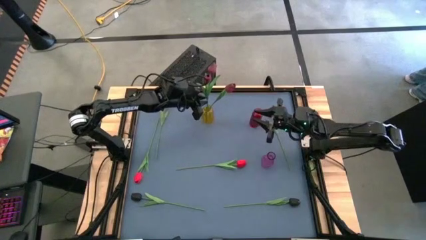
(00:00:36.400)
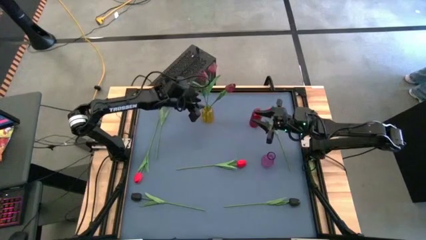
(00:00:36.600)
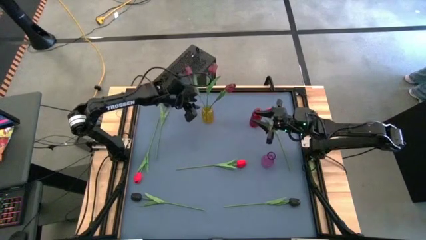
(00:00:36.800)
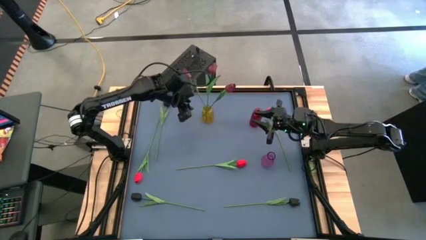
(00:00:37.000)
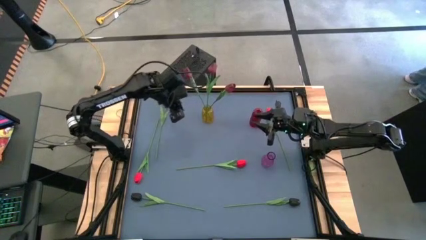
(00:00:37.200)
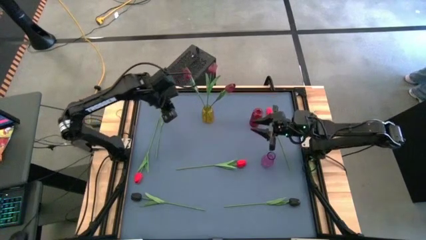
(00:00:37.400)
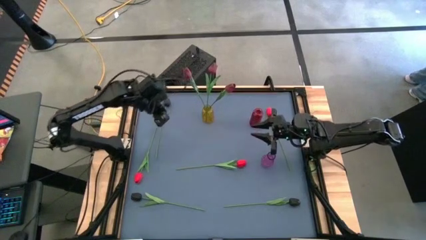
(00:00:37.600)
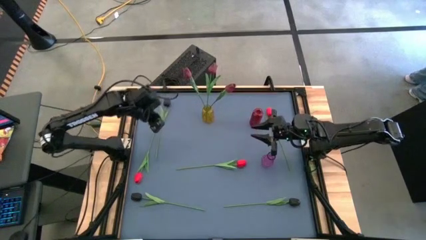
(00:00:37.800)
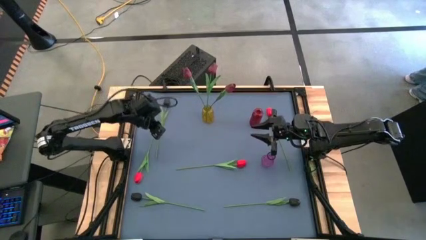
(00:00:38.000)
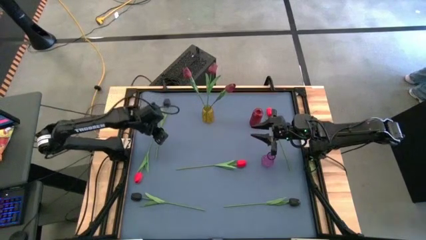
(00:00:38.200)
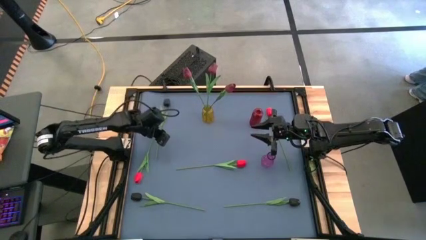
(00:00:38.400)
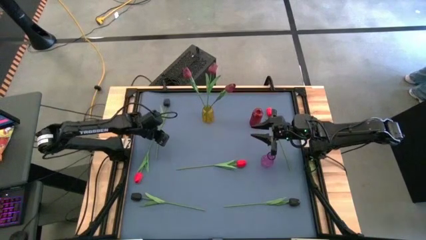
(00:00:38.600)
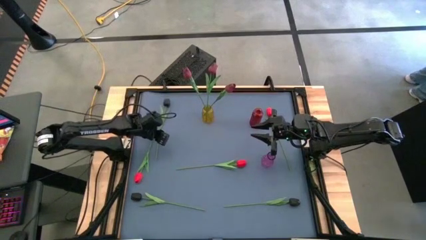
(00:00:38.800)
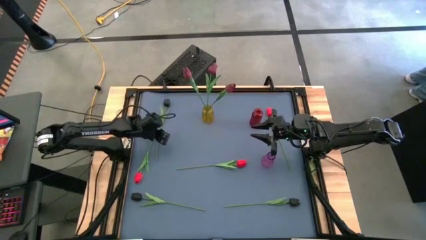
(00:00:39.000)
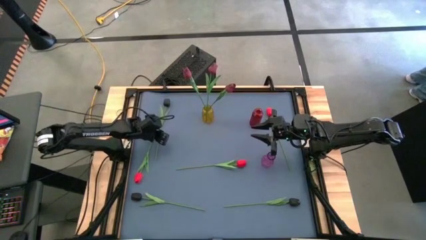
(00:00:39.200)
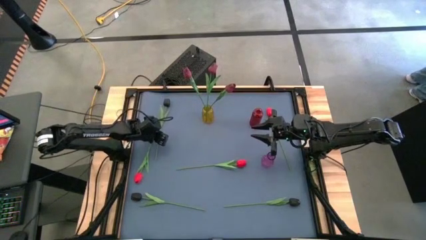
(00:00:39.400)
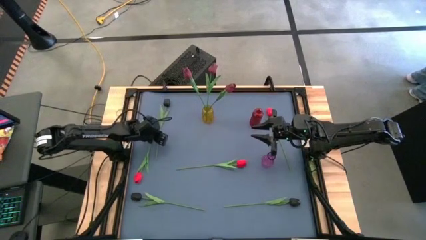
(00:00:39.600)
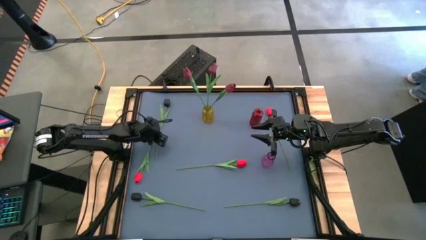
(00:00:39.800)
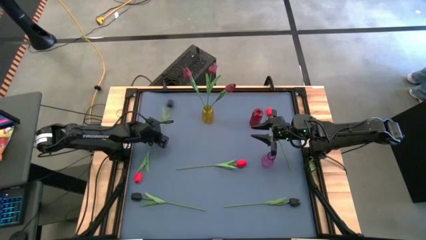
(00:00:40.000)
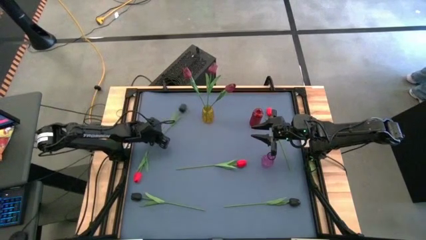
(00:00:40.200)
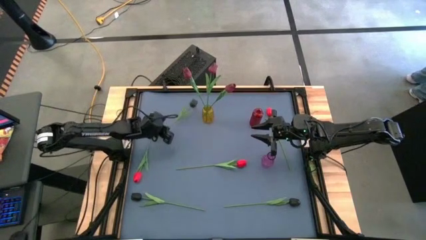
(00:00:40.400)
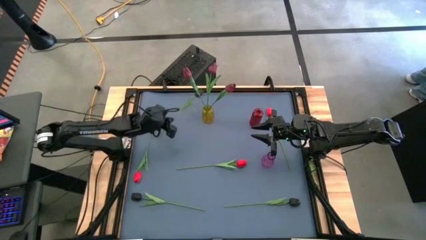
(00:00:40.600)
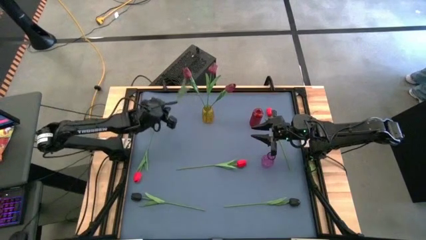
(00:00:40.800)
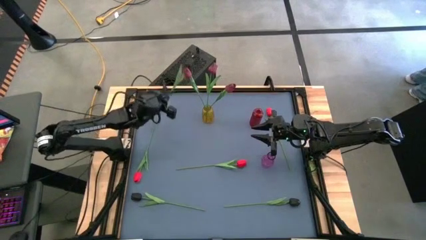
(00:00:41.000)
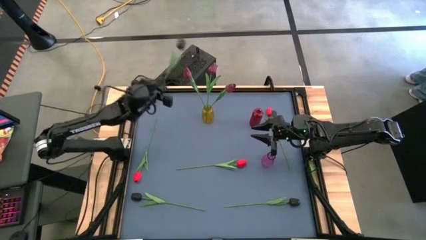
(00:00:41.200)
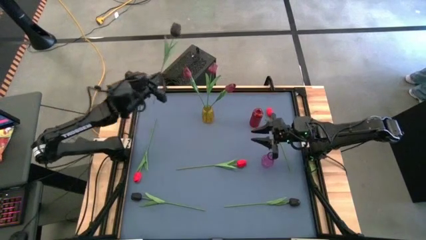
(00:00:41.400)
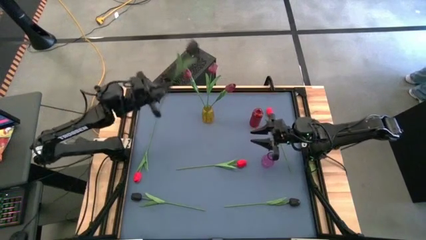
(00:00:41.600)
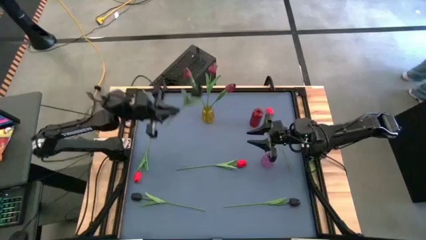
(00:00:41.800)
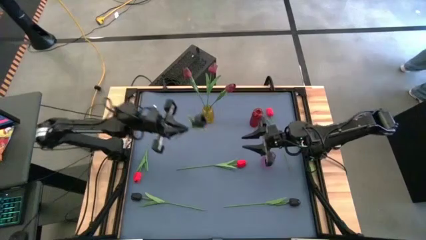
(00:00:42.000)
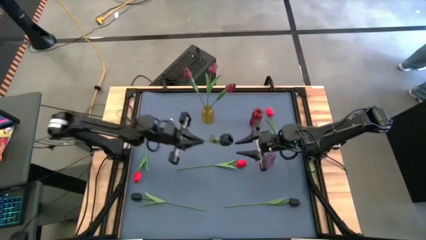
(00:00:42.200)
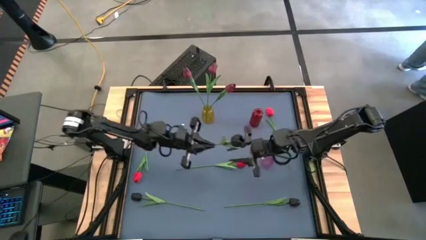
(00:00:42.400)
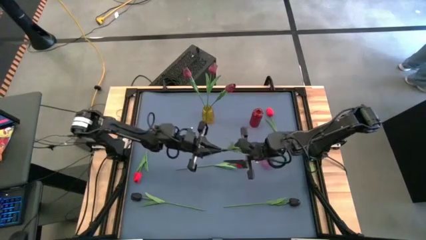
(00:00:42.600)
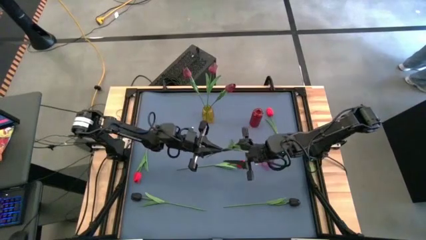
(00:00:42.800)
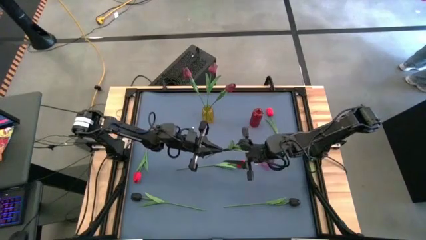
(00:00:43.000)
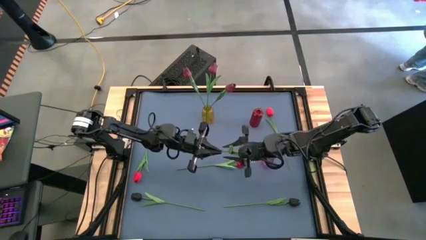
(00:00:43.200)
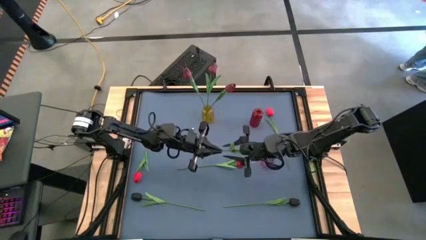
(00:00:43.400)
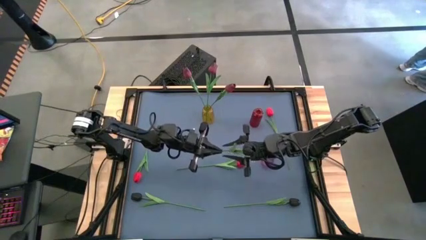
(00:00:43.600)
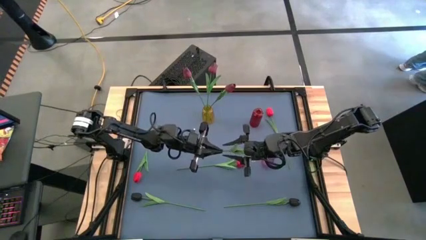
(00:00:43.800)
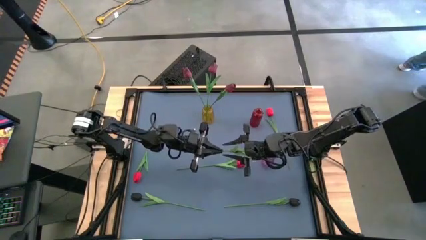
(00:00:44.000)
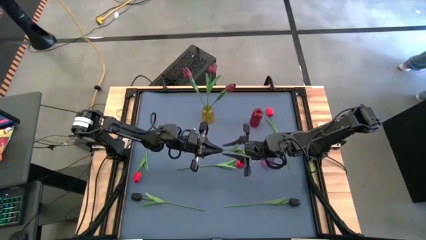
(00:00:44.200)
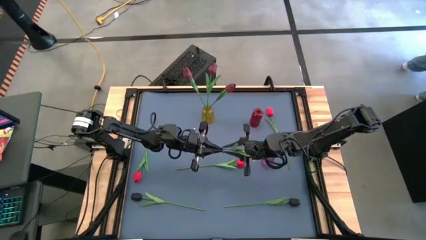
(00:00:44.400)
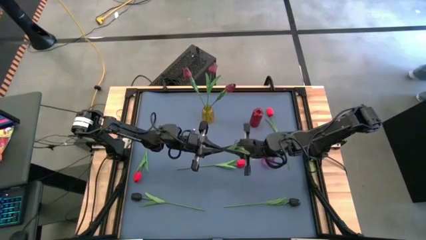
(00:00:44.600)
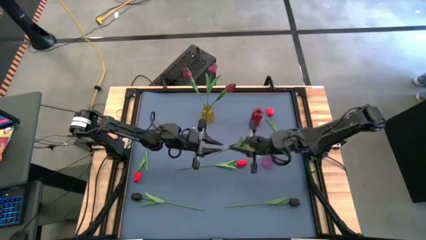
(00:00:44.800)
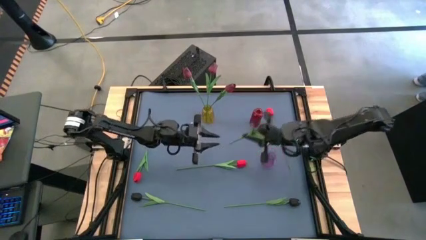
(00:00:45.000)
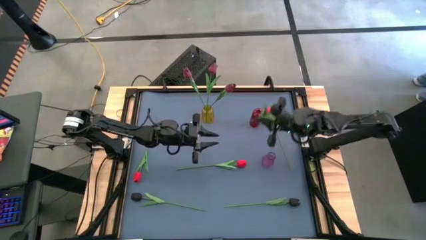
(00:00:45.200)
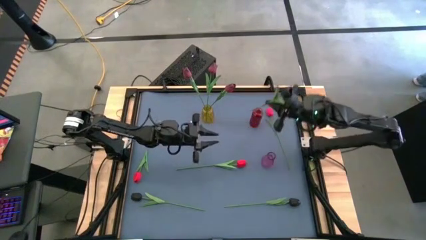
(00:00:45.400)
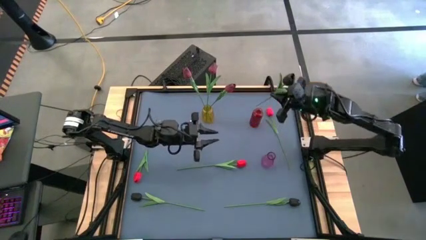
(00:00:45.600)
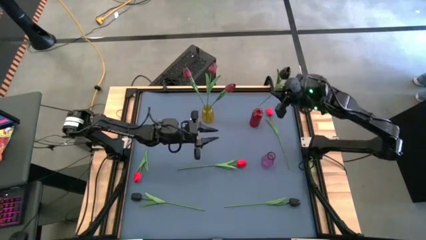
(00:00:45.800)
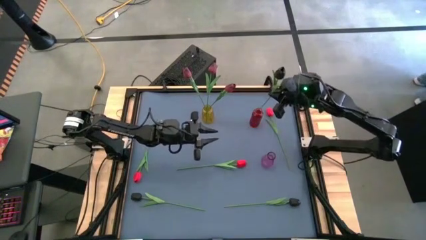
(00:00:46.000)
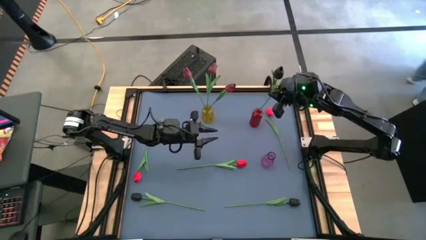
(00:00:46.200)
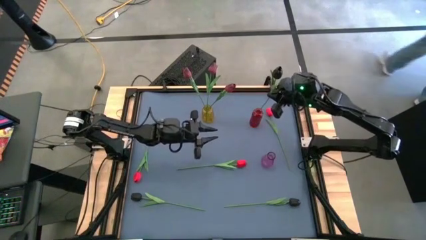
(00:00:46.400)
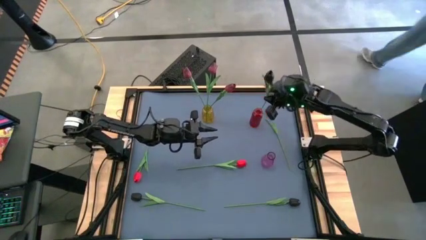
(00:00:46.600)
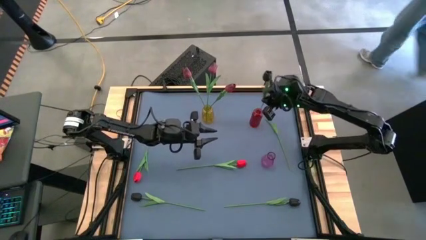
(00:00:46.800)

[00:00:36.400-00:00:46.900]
Task: Sort flowers into vase by color
Put the top black flower into the red vase
